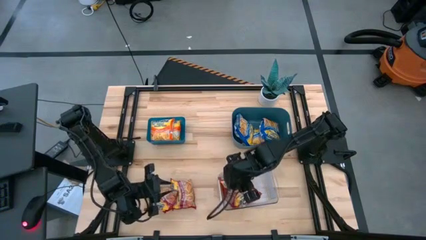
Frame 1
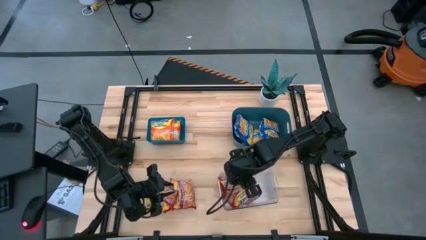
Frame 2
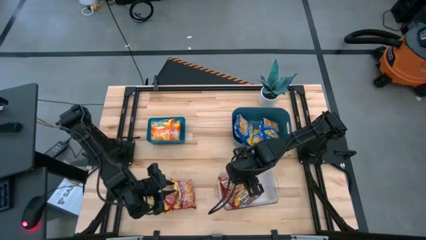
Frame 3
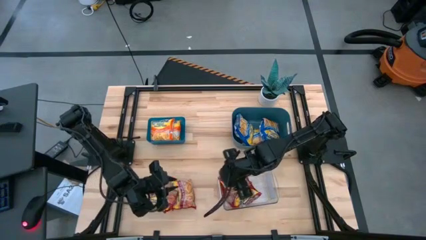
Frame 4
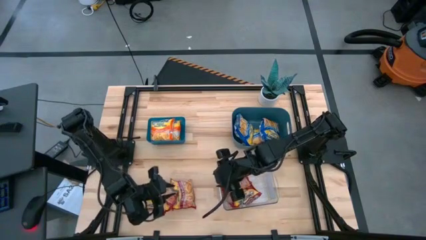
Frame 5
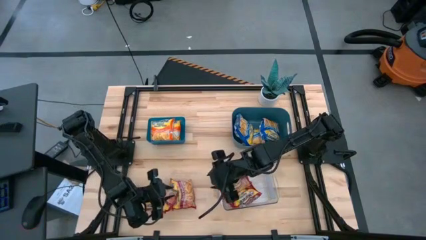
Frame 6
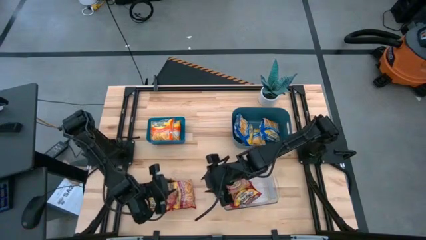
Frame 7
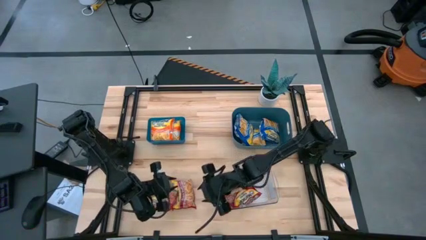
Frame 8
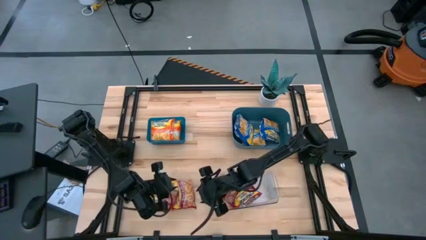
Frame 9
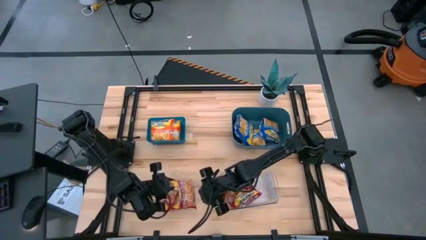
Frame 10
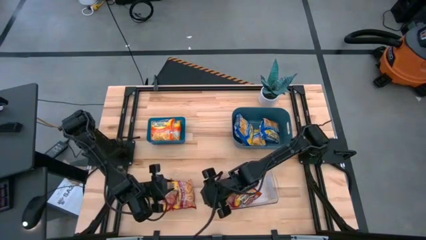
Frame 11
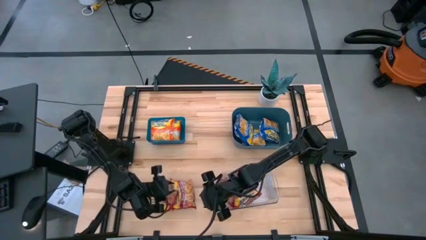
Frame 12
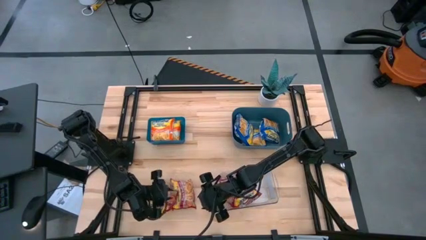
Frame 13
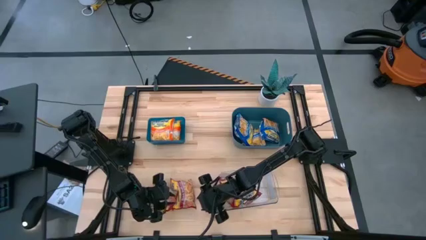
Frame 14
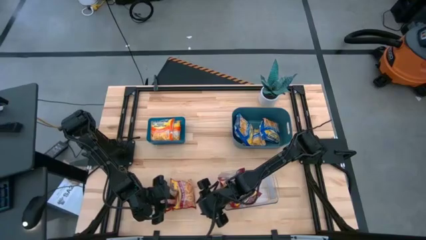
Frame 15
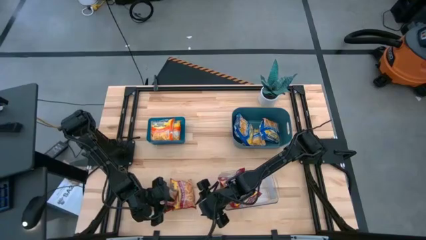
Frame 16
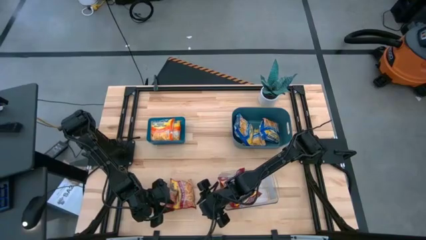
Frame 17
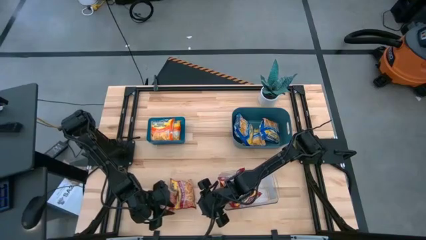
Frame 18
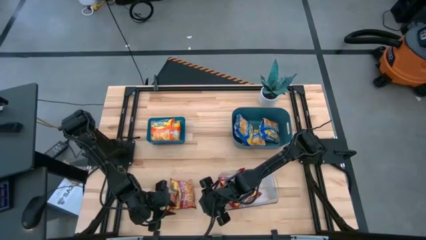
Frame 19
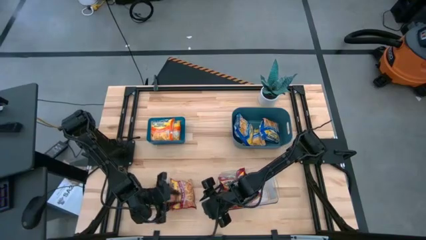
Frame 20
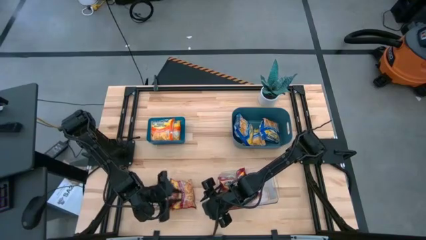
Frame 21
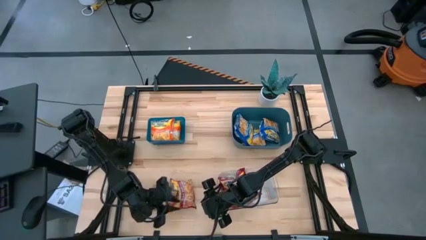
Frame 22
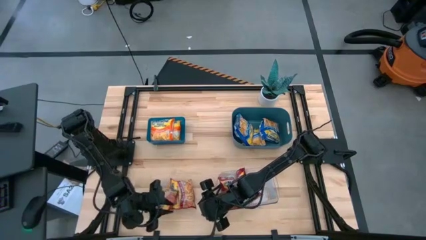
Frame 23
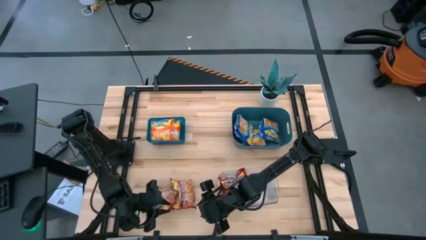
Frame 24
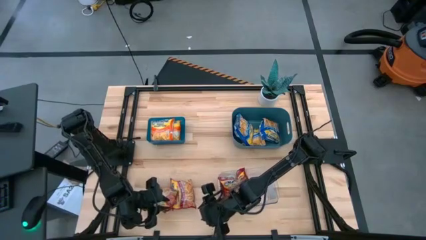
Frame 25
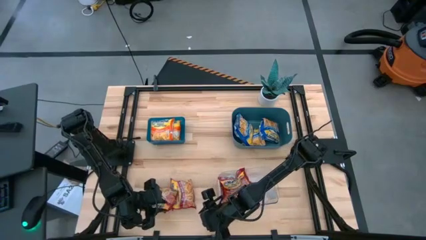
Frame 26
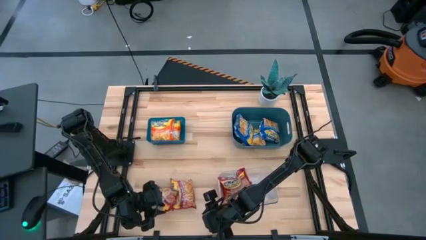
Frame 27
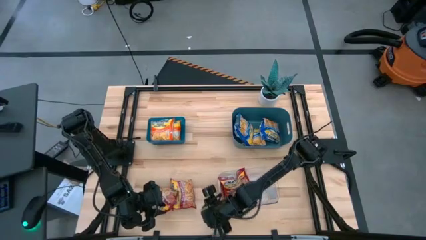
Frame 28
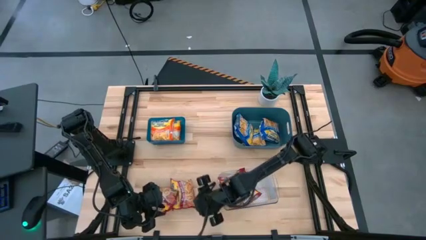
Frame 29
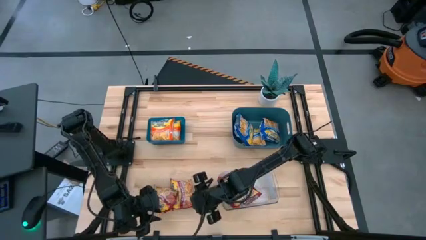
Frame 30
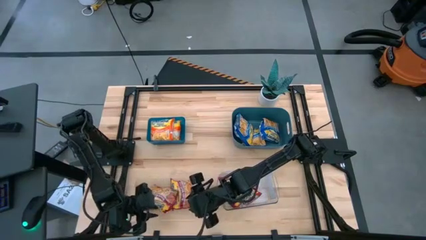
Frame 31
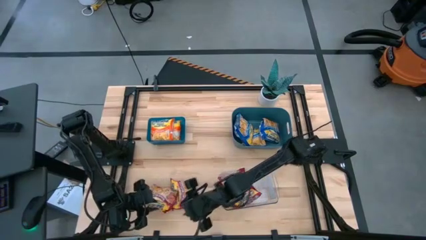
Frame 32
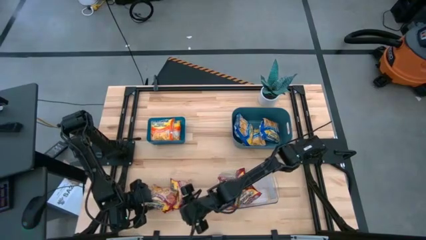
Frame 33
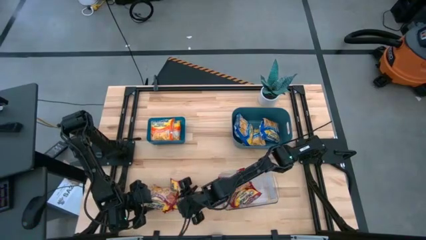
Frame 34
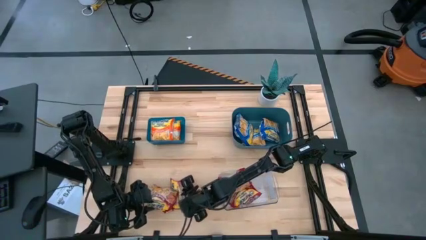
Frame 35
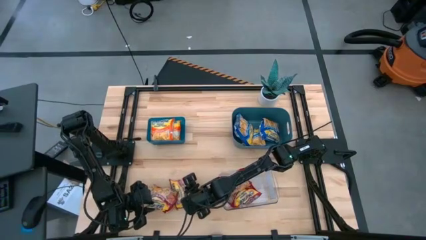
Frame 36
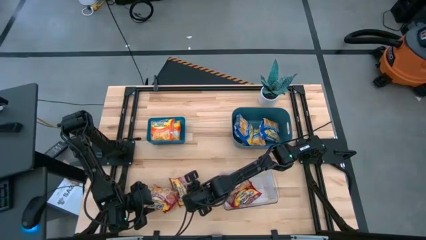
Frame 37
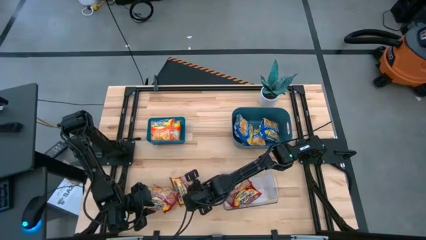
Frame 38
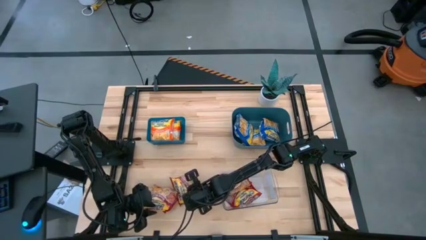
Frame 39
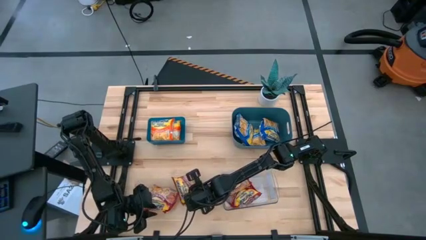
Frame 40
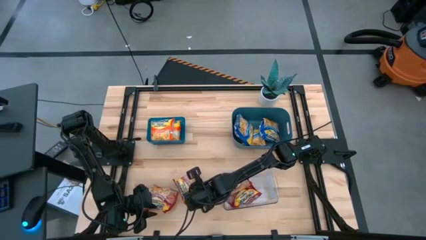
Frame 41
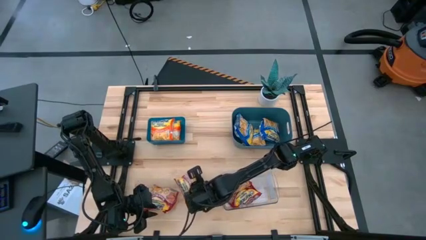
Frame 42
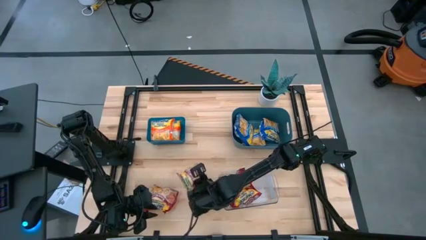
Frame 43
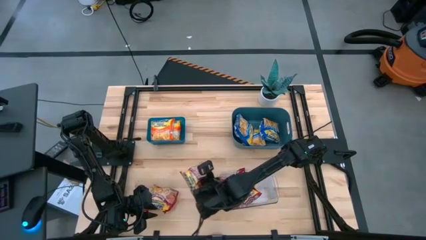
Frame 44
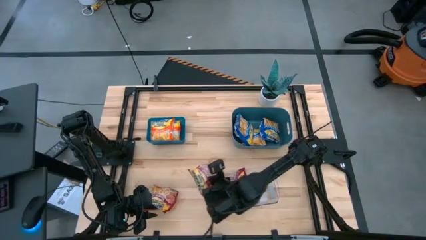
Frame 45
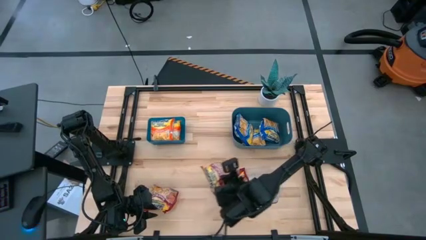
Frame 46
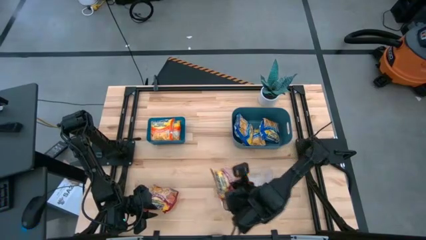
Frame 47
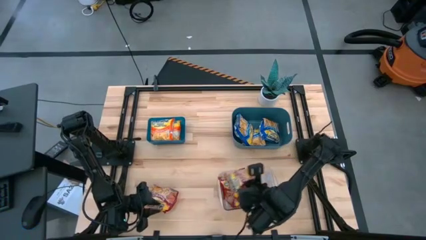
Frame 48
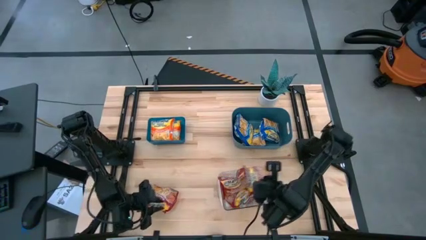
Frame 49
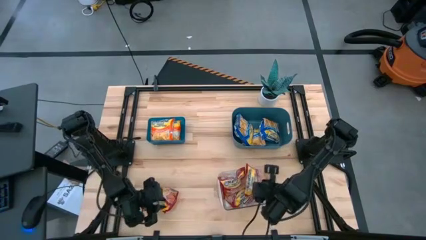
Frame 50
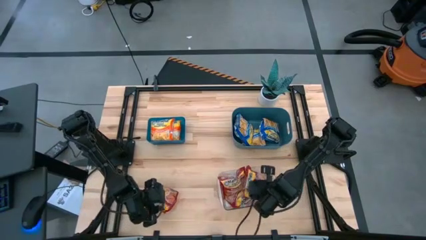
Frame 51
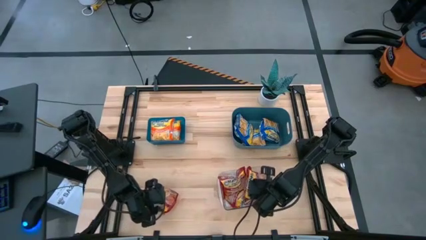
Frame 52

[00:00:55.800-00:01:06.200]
Task: Sort Maruchan noodles
Put the red noodle pack into the transparent bin

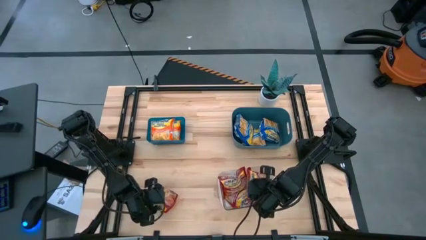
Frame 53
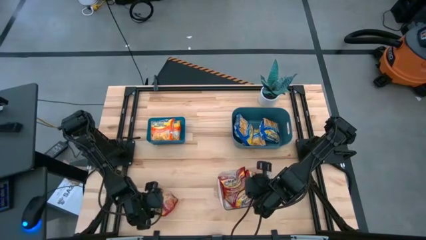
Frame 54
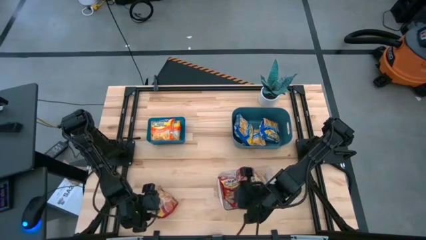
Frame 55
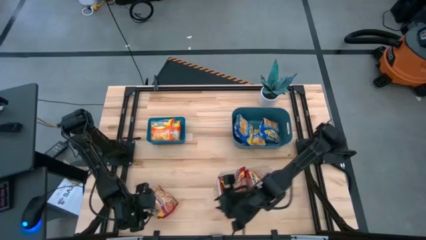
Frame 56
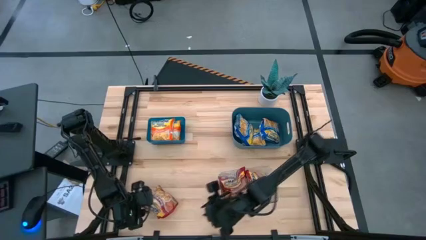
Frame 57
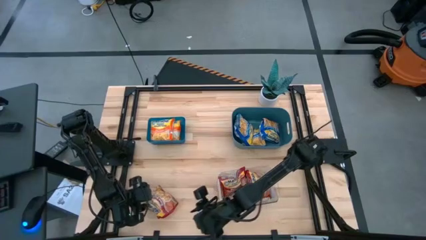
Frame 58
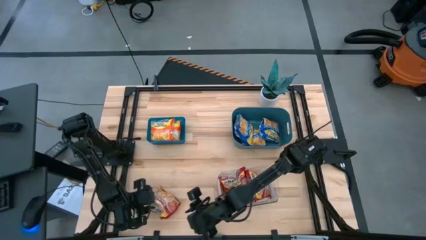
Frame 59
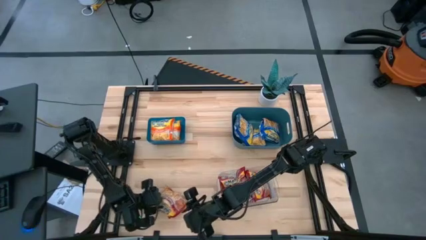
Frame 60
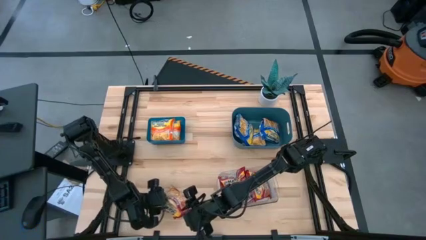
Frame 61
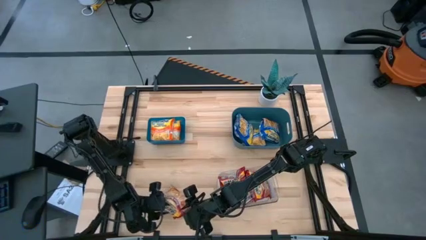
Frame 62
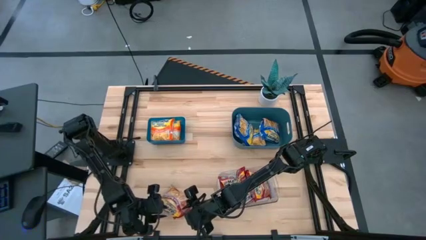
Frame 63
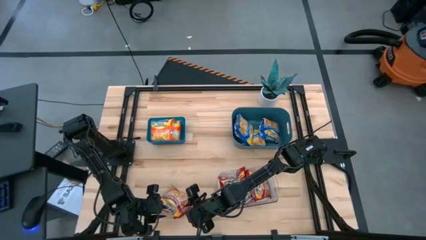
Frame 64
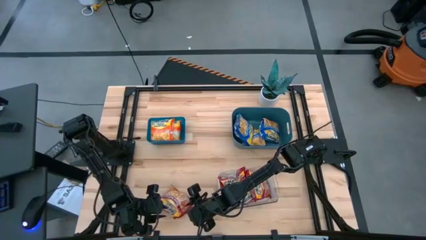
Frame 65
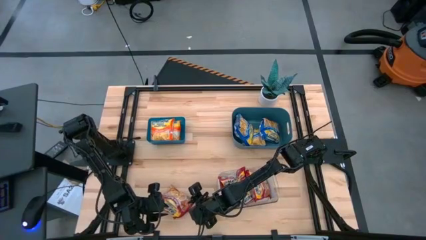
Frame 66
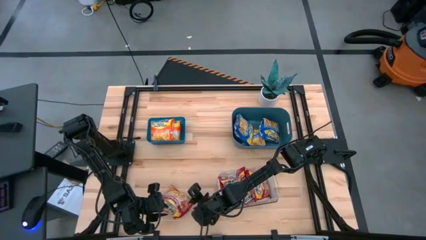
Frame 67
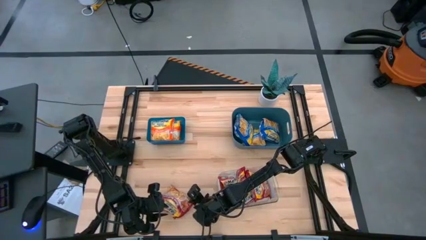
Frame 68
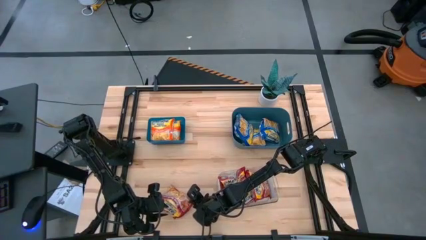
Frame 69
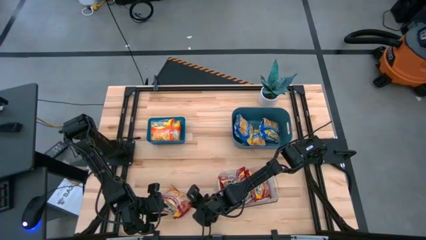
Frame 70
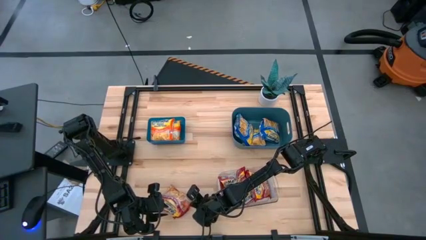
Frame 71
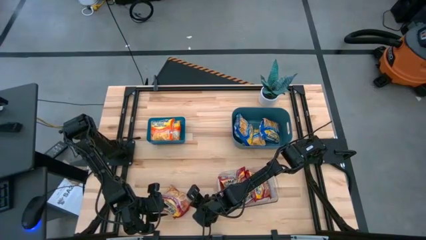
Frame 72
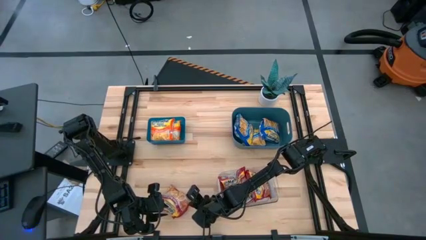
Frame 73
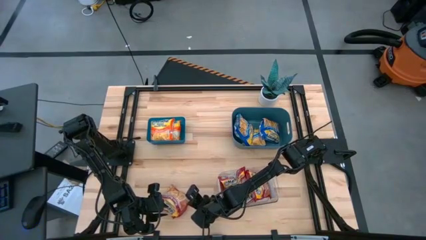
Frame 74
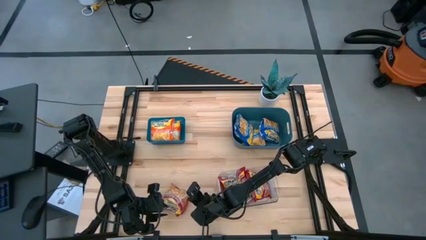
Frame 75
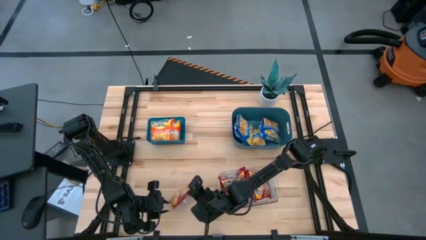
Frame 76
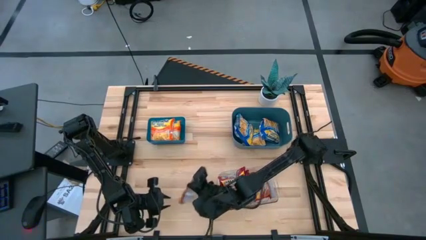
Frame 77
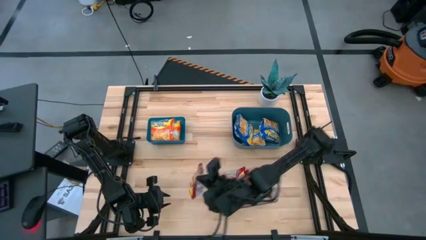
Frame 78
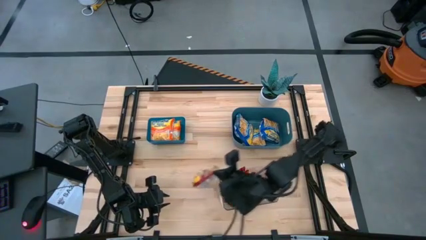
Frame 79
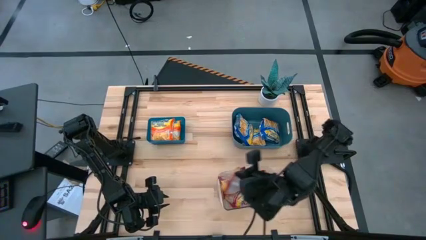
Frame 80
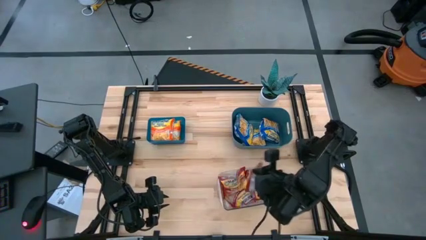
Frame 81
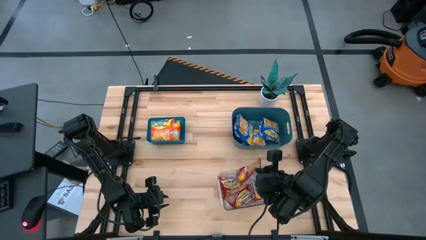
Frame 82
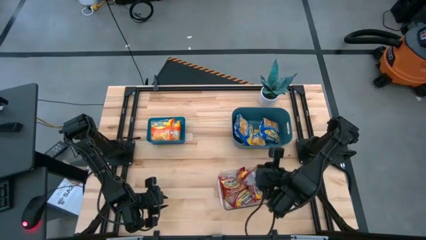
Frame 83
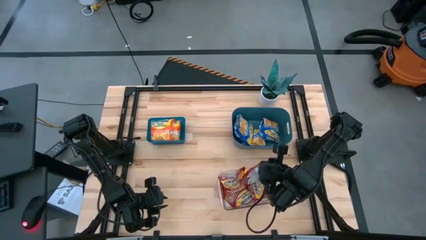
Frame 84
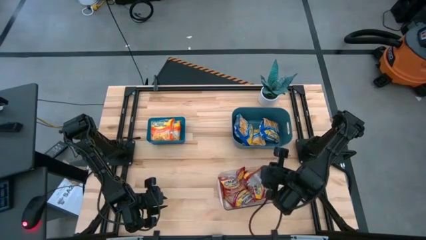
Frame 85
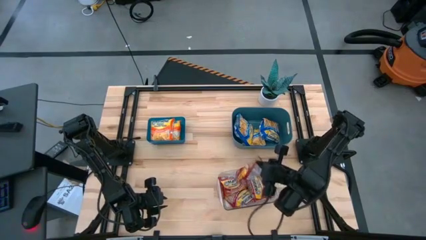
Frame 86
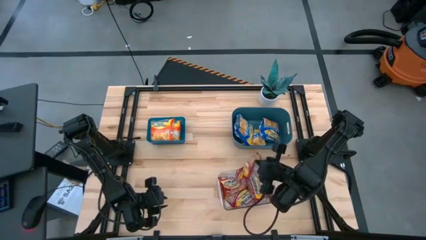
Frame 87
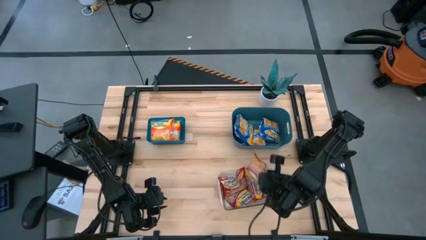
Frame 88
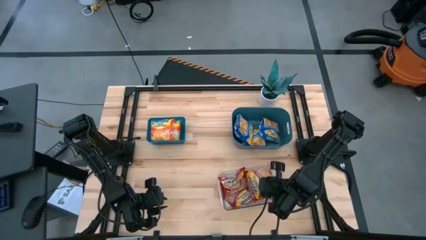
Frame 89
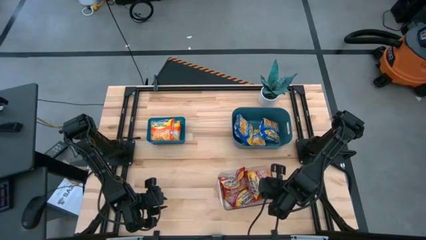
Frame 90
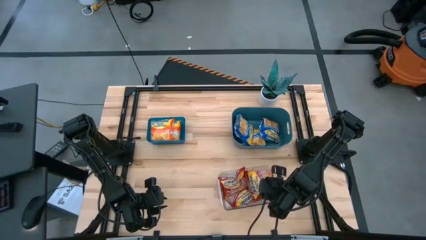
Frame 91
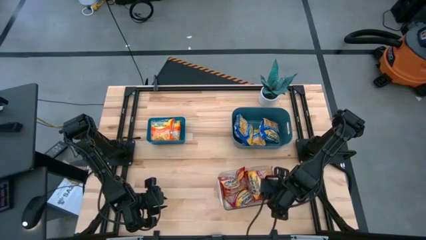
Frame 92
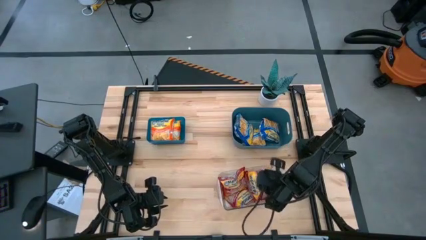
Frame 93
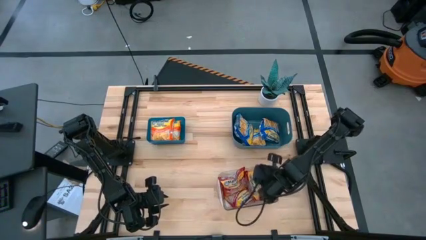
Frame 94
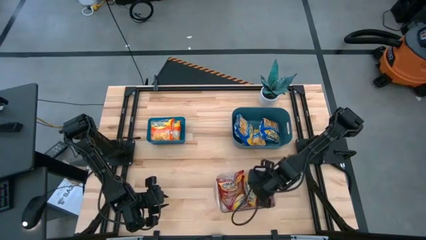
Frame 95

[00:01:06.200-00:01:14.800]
Put the red noodle pack into the transparent bin
